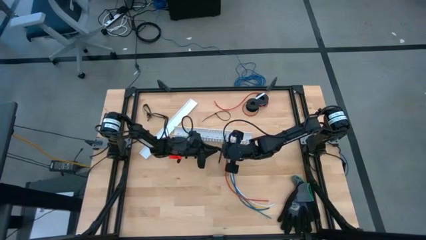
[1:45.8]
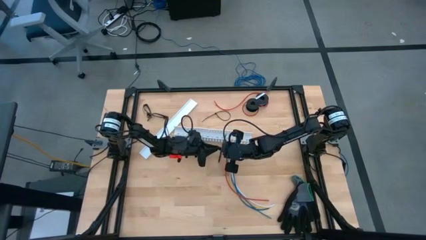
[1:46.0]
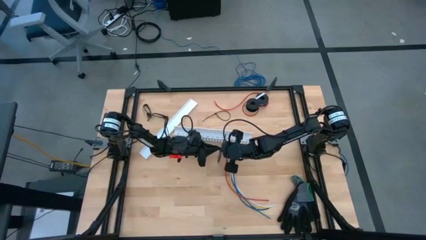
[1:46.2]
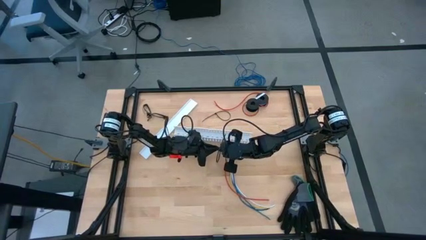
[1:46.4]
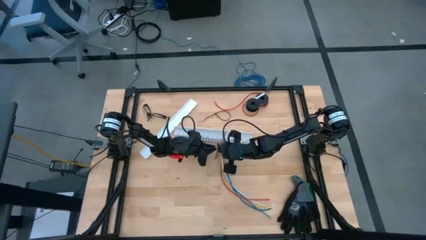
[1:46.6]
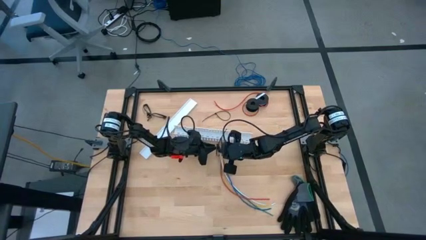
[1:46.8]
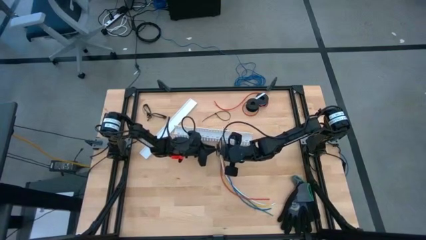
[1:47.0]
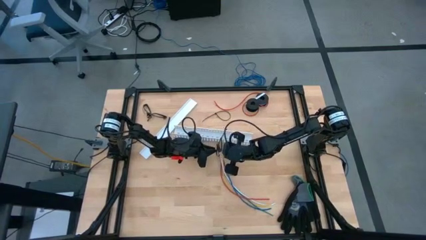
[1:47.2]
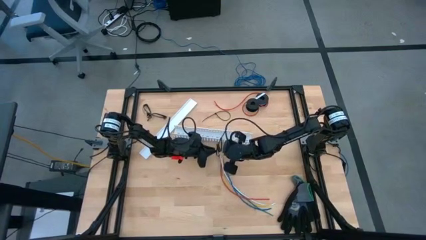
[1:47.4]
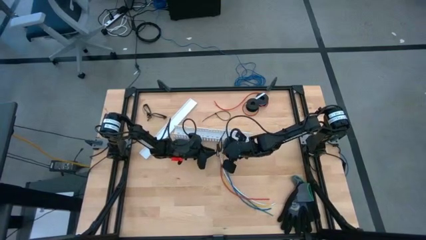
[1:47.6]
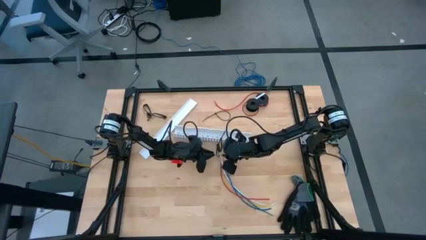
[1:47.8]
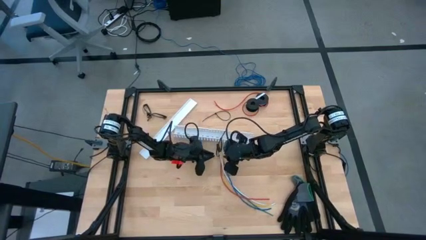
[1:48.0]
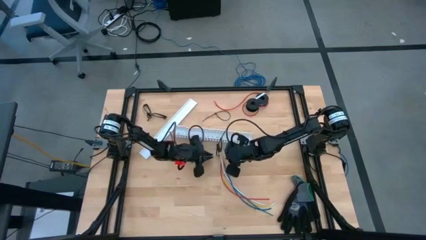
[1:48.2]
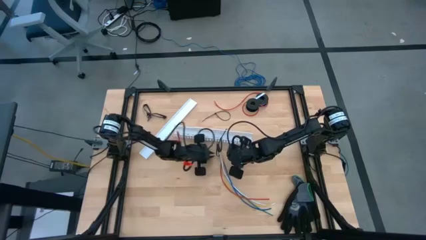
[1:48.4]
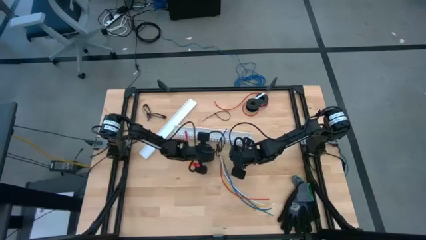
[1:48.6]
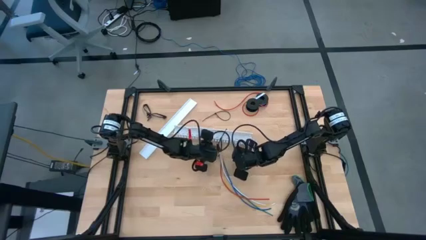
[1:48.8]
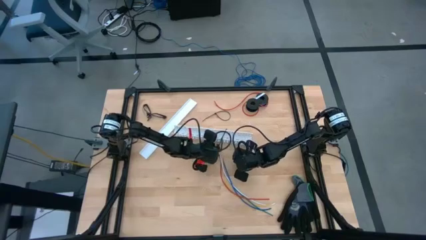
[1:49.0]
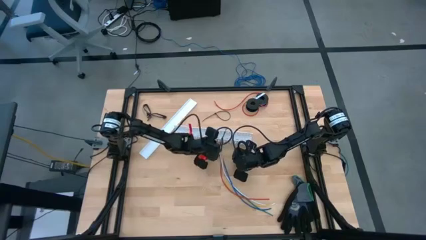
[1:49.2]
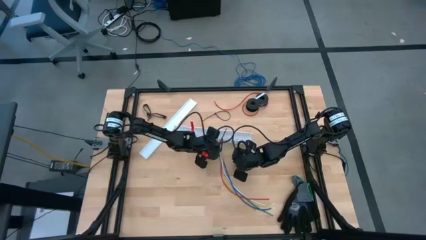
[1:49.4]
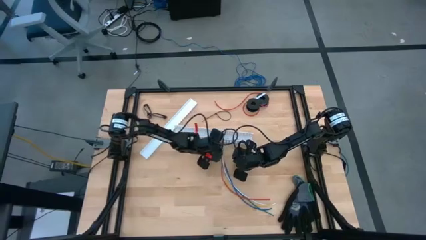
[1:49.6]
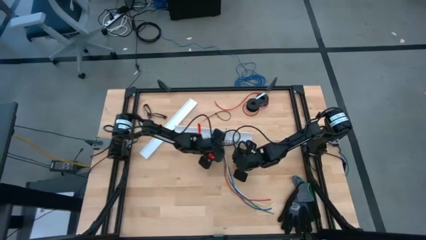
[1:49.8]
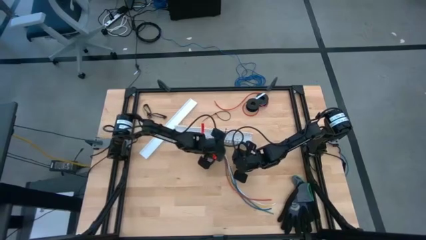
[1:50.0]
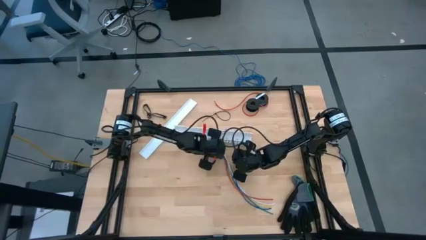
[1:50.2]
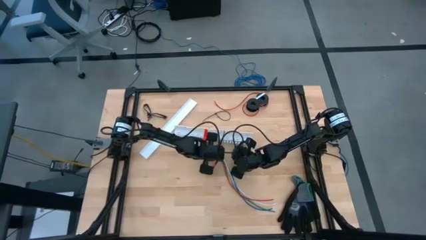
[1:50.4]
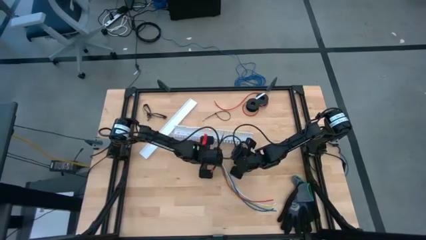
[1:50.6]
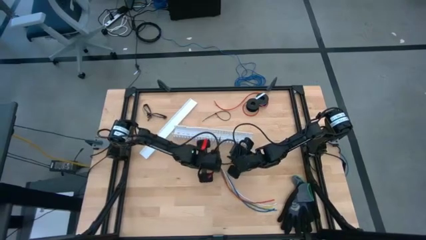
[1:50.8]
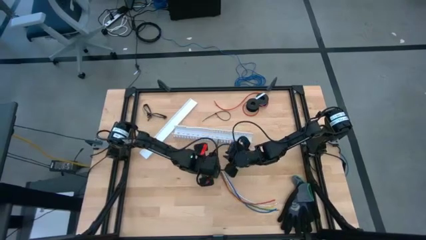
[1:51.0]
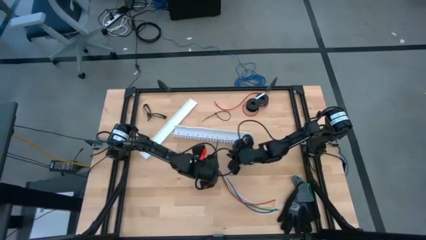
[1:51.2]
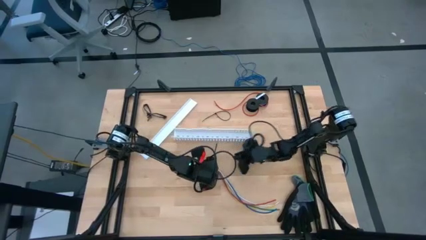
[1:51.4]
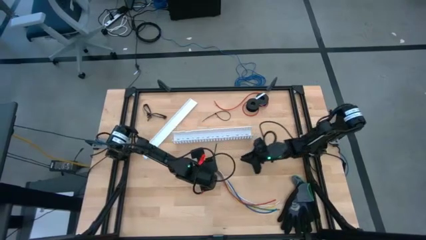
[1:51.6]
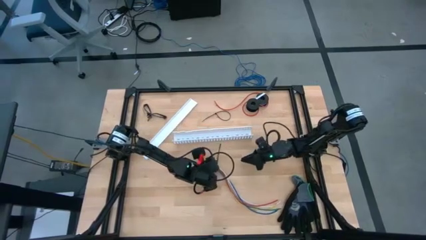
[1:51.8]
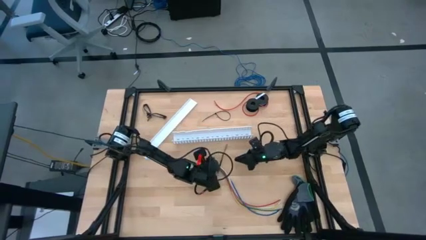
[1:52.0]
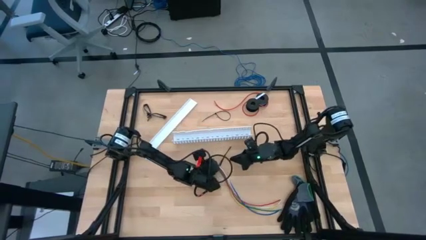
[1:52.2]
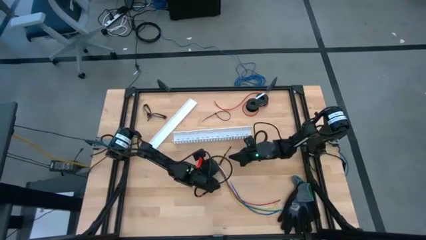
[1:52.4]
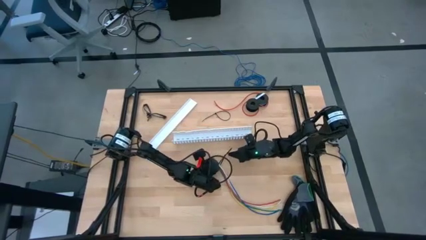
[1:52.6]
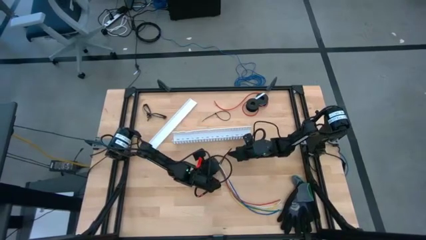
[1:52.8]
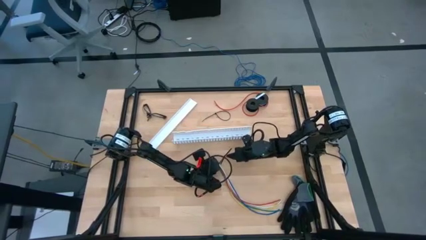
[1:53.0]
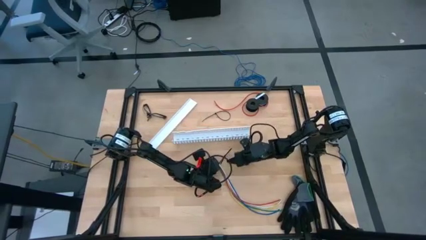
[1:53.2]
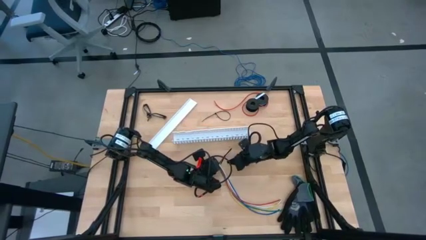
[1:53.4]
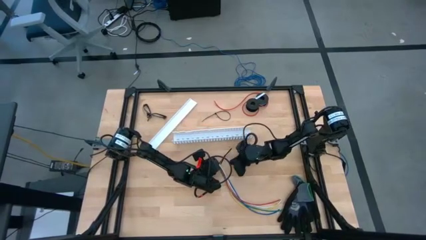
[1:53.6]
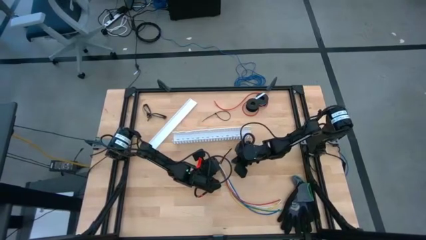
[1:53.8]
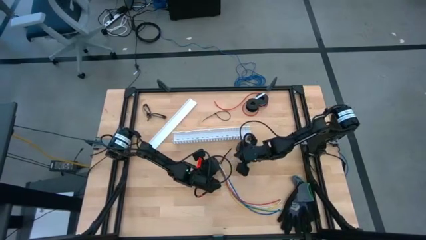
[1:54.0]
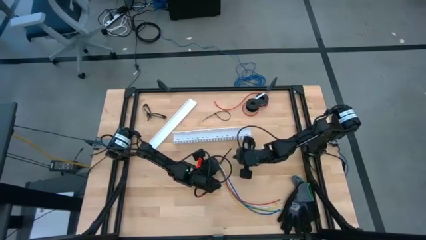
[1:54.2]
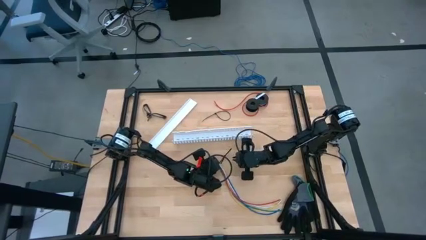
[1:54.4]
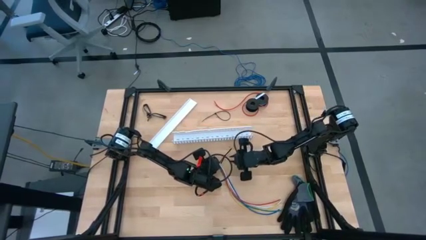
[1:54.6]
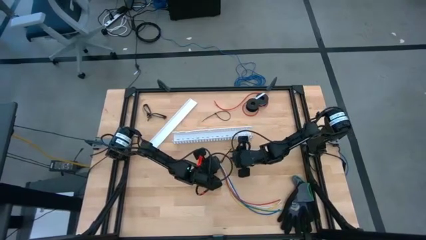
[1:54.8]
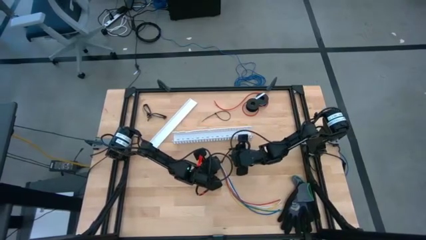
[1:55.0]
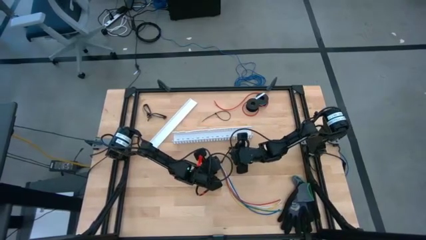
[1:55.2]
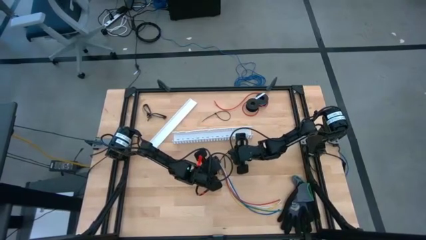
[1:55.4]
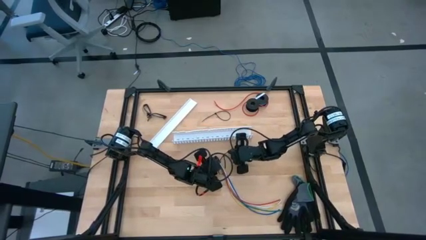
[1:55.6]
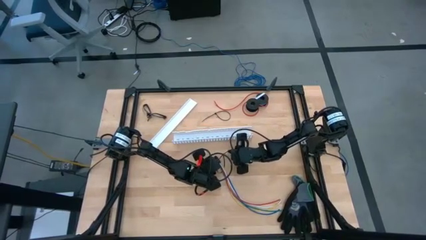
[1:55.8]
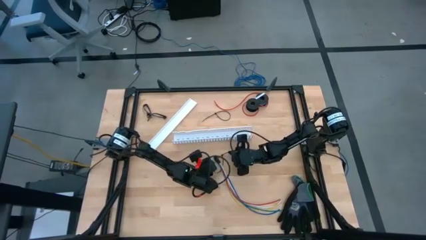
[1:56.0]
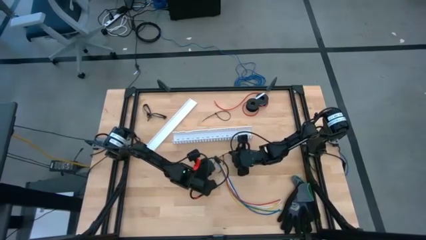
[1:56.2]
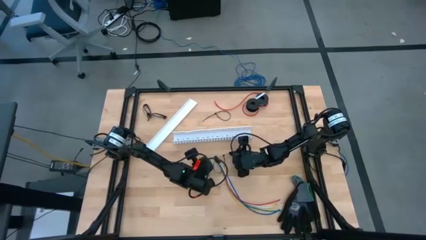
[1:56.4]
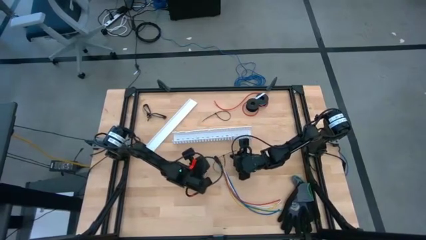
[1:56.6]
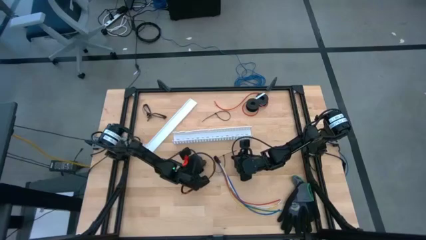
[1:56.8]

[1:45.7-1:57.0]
Task: Ziptie cables
Wrap the cables together using the left black zip tie

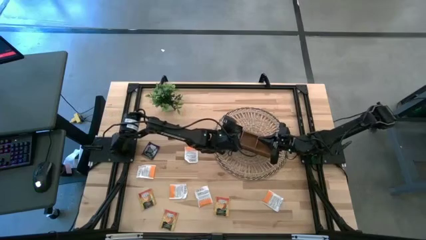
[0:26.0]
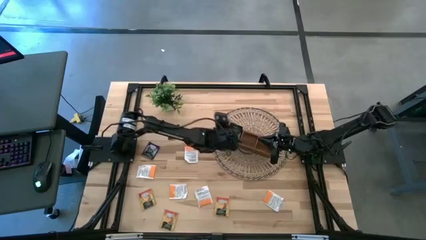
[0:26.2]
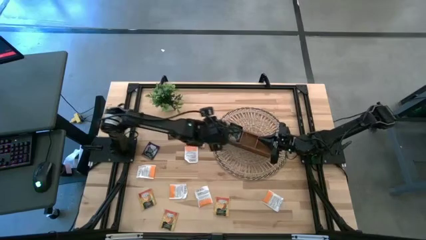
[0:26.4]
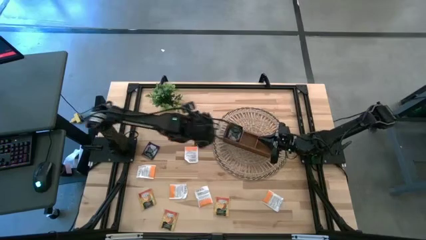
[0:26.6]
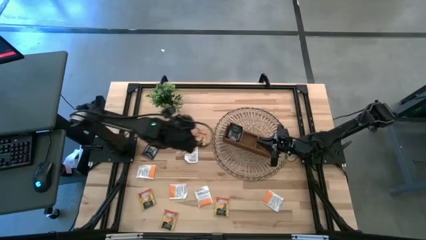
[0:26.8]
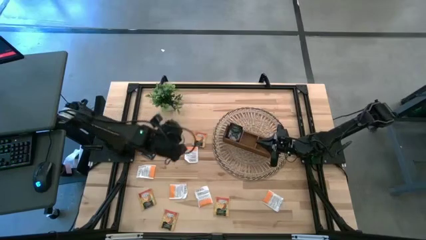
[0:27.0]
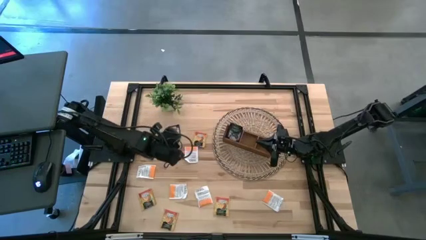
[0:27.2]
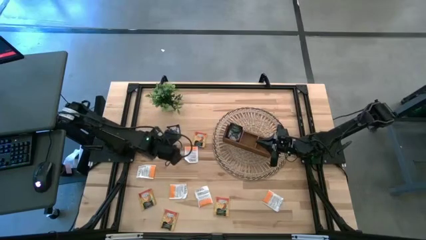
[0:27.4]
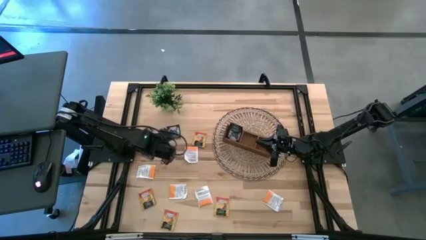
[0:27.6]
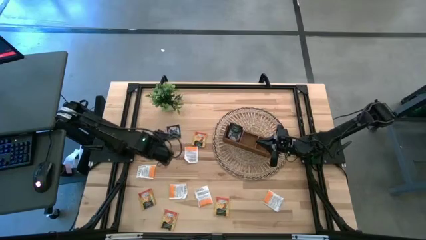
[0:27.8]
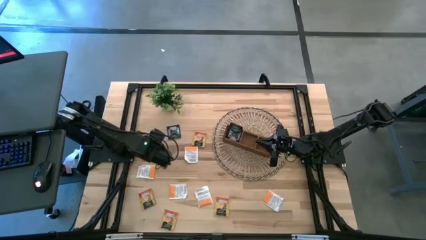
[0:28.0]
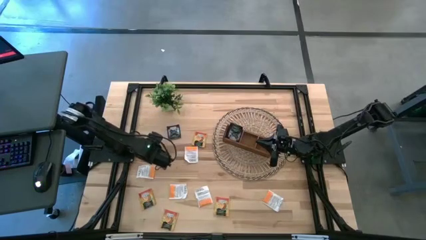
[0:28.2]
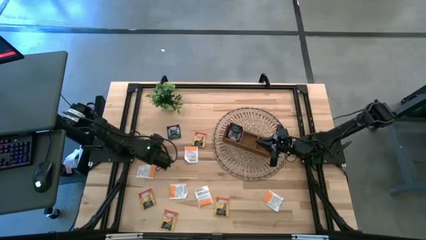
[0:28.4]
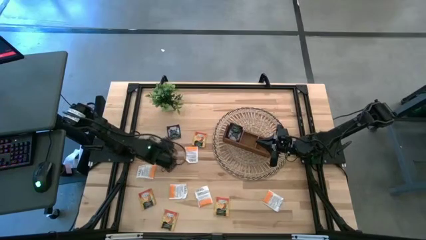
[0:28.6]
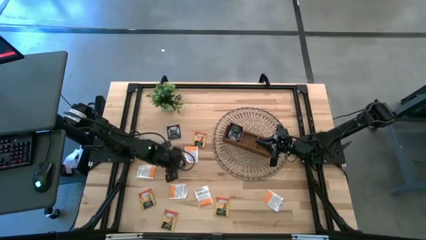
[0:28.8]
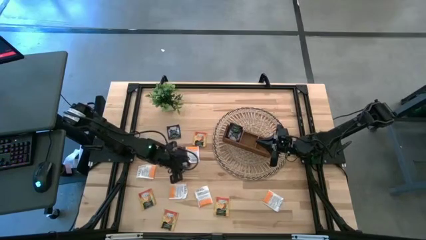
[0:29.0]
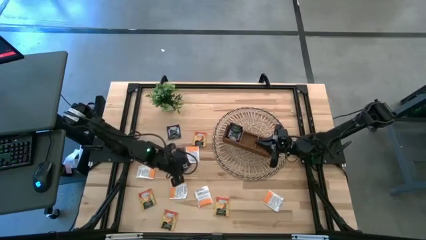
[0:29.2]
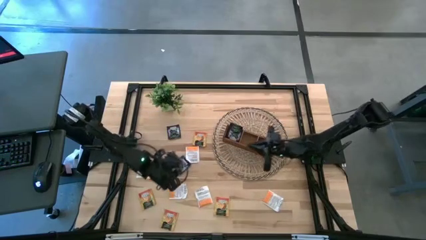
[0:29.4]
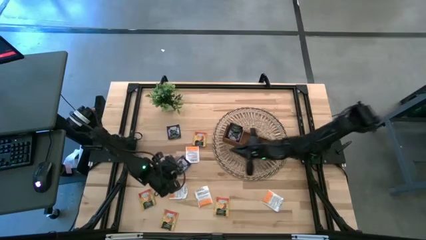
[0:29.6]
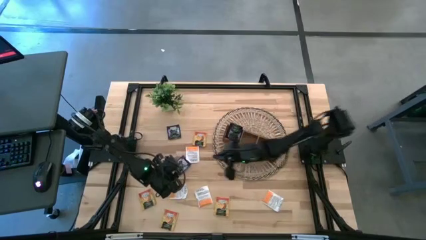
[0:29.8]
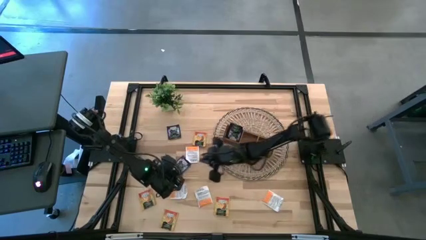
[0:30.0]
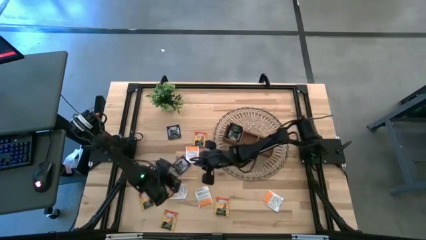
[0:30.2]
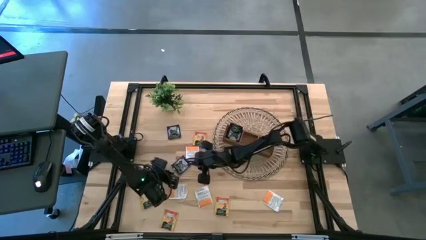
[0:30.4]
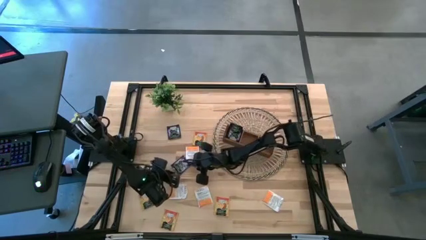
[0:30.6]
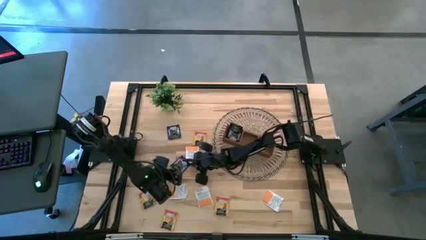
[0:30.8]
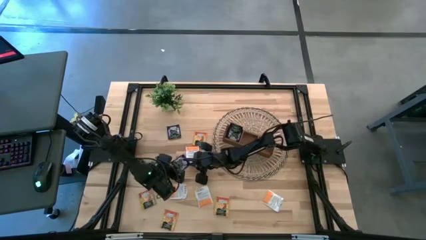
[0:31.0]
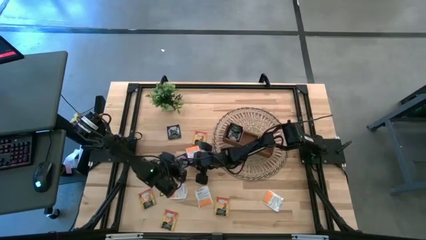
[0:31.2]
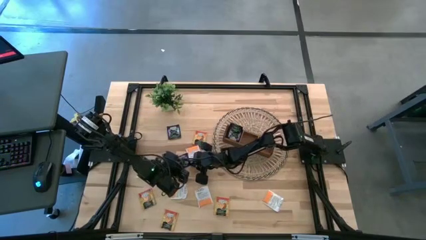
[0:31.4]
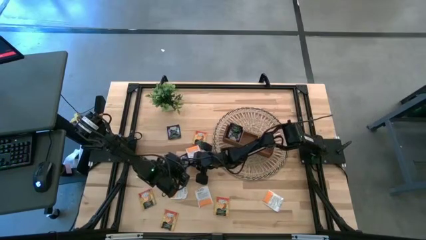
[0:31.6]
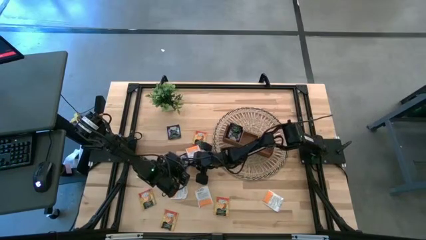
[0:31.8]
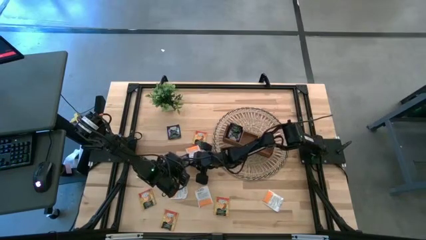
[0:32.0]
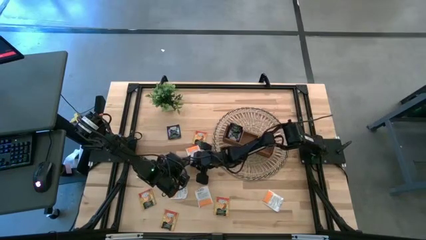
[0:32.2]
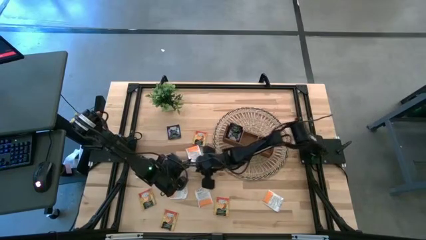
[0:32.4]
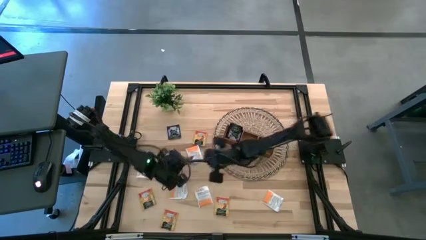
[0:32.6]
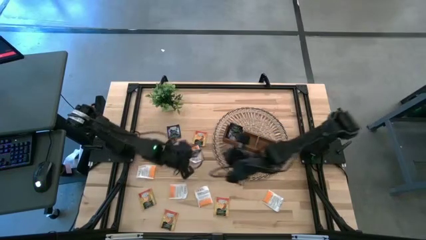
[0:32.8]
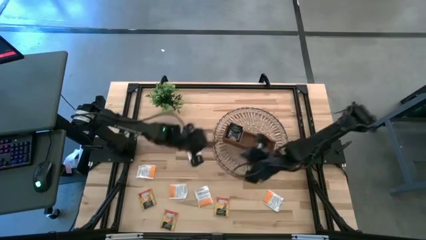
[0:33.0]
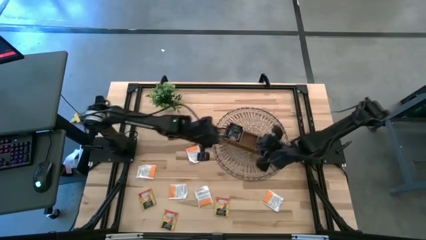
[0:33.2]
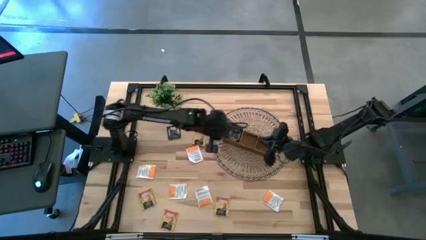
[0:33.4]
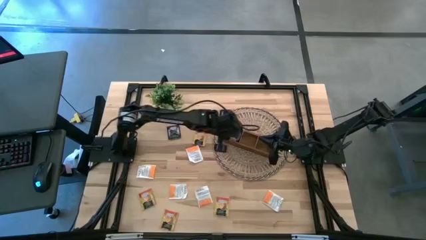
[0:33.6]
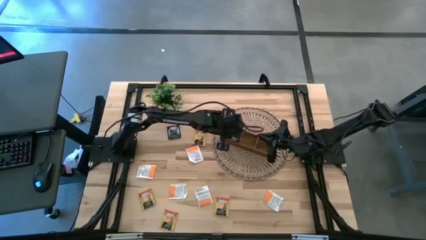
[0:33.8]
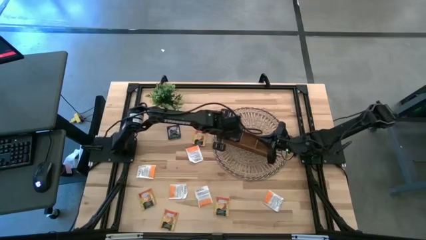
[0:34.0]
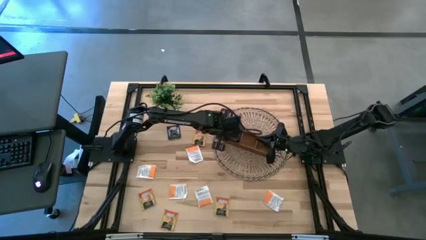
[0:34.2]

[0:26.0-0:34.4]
Task: Pick & Place Tea
Put the violet tea bag into the left section of the wooden organizer
